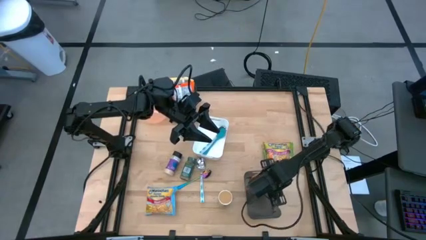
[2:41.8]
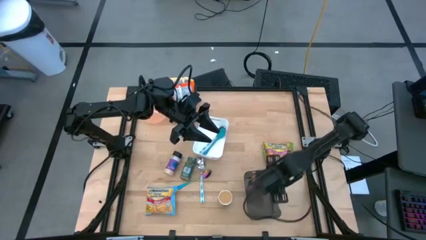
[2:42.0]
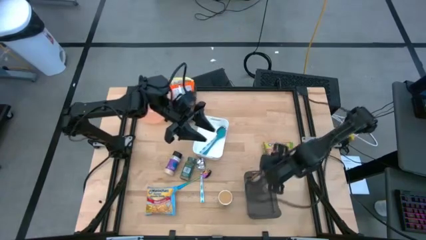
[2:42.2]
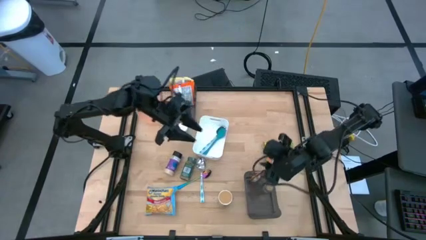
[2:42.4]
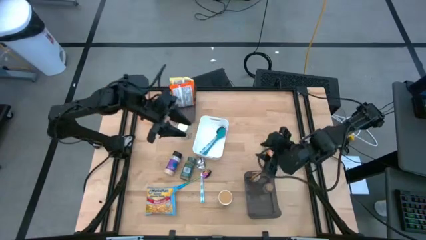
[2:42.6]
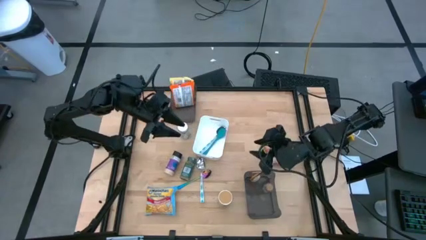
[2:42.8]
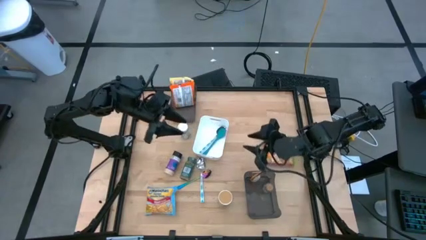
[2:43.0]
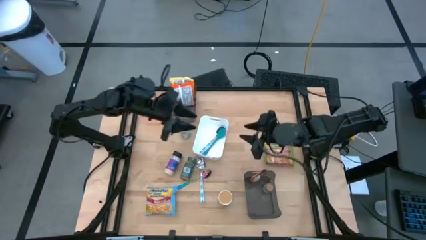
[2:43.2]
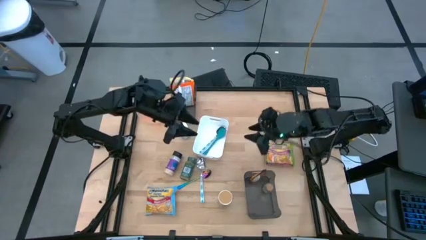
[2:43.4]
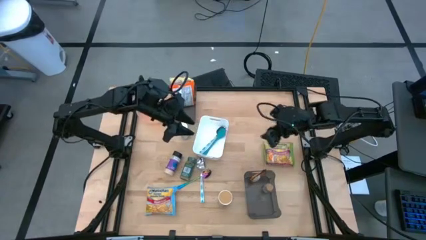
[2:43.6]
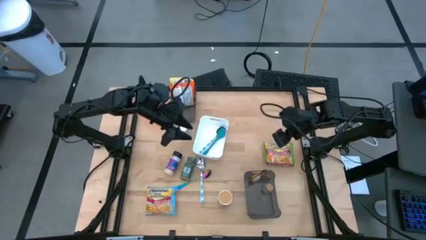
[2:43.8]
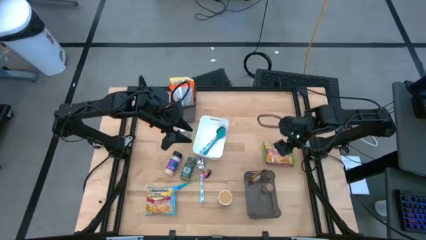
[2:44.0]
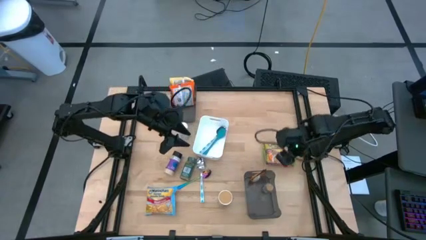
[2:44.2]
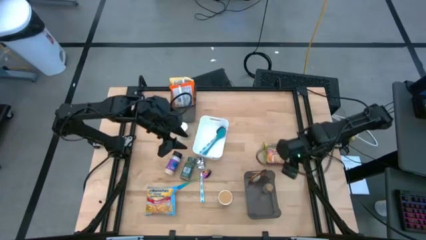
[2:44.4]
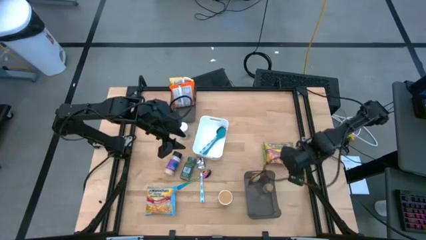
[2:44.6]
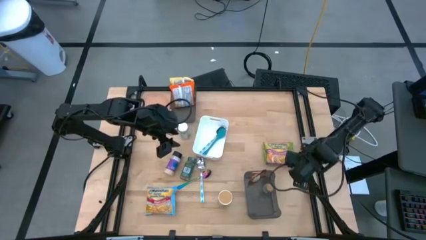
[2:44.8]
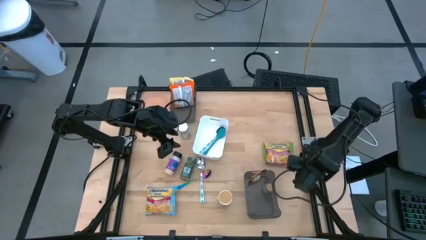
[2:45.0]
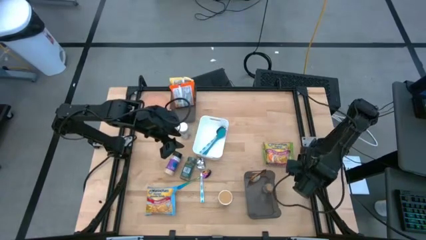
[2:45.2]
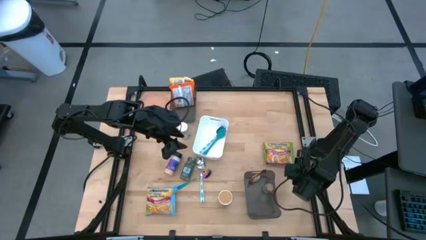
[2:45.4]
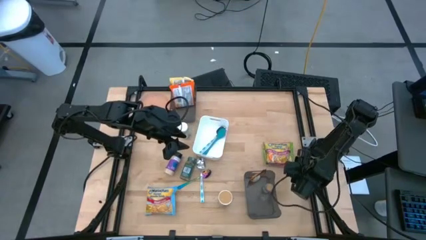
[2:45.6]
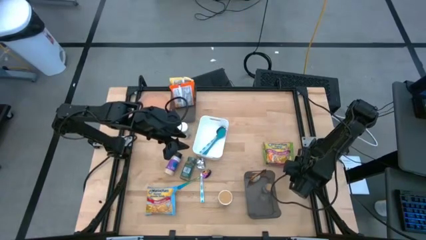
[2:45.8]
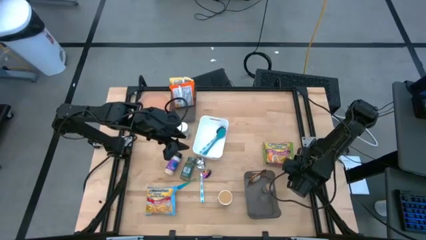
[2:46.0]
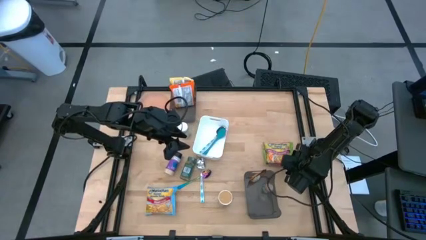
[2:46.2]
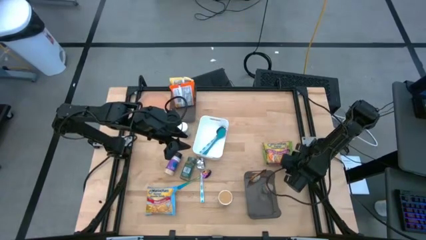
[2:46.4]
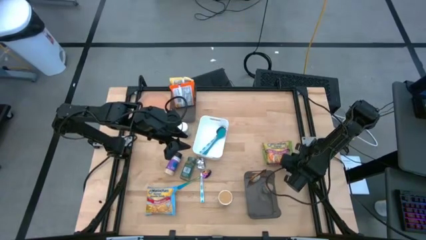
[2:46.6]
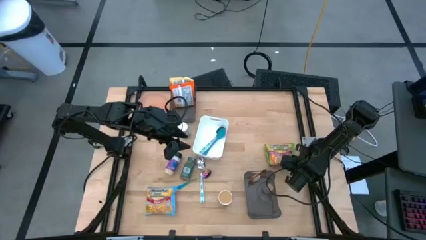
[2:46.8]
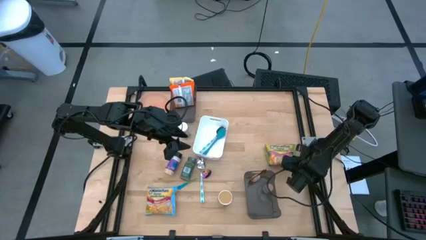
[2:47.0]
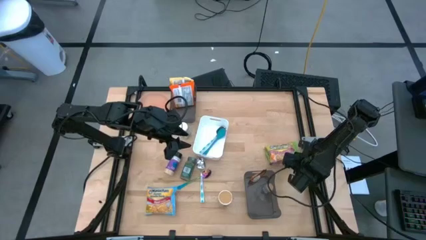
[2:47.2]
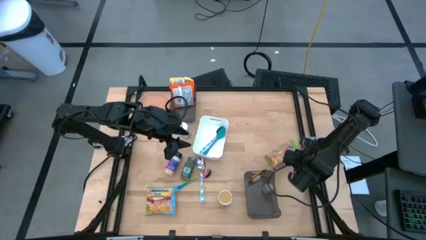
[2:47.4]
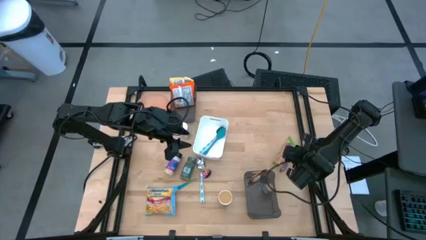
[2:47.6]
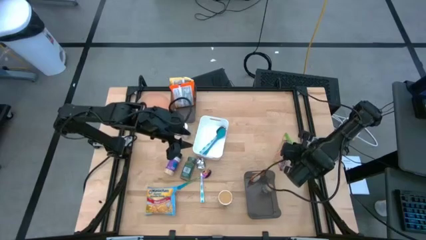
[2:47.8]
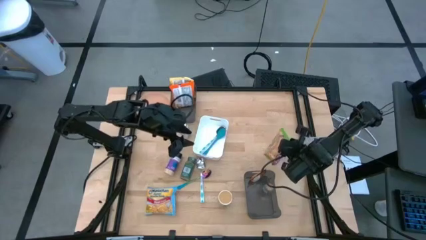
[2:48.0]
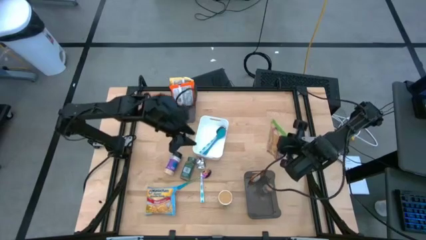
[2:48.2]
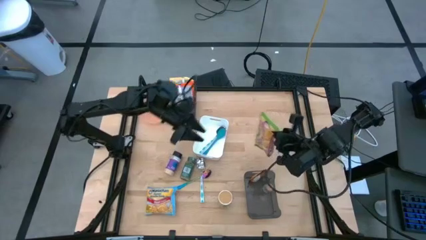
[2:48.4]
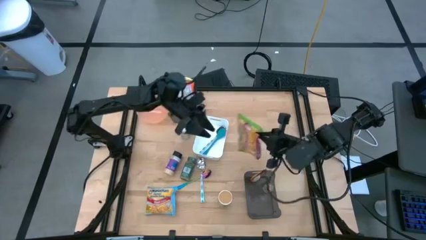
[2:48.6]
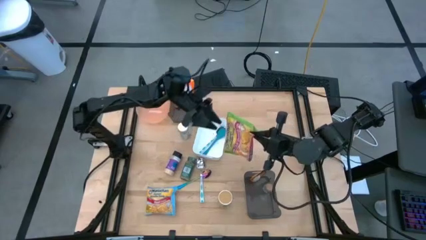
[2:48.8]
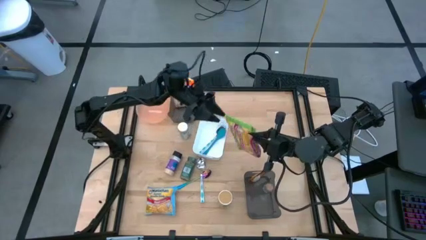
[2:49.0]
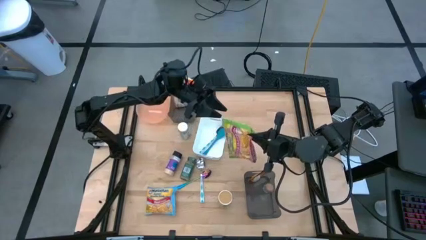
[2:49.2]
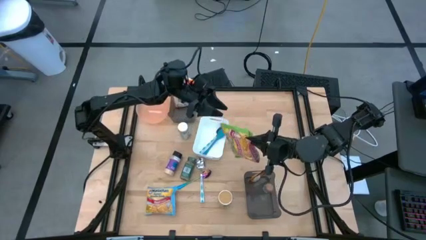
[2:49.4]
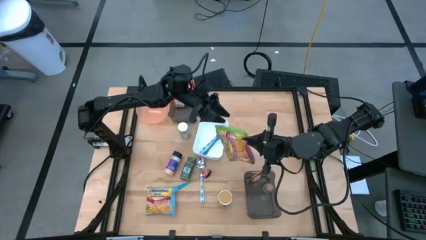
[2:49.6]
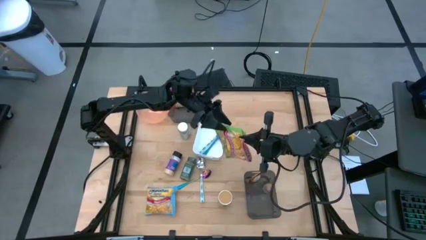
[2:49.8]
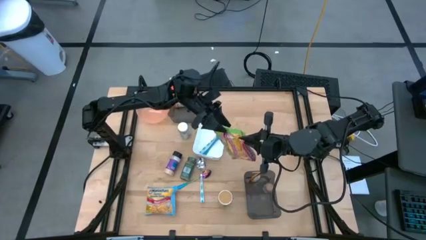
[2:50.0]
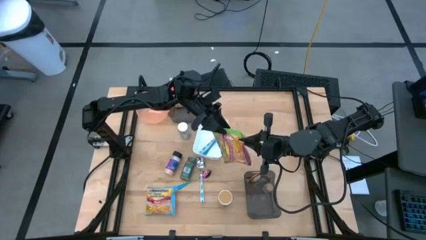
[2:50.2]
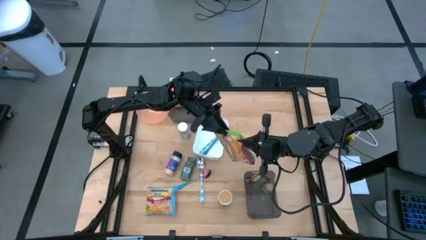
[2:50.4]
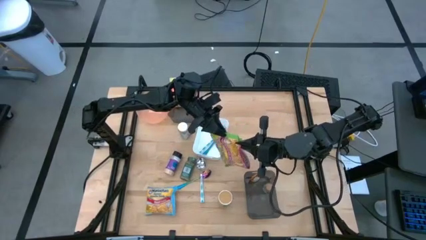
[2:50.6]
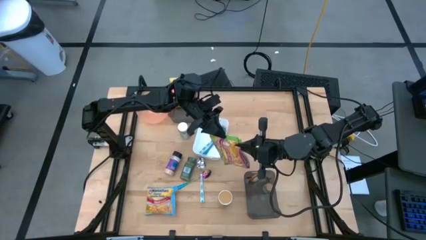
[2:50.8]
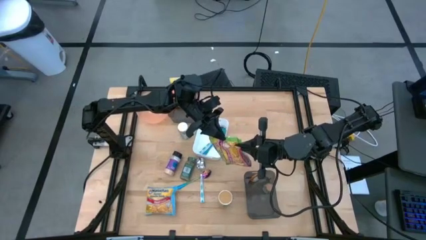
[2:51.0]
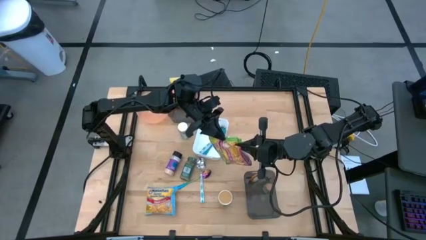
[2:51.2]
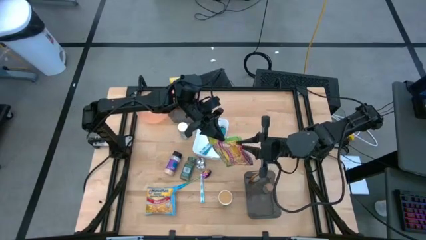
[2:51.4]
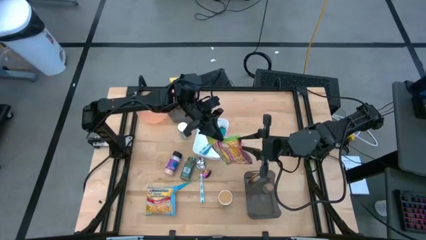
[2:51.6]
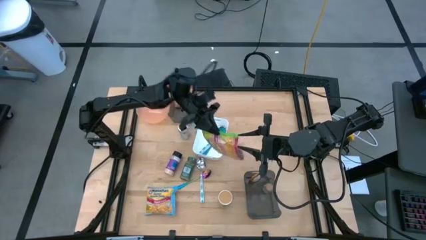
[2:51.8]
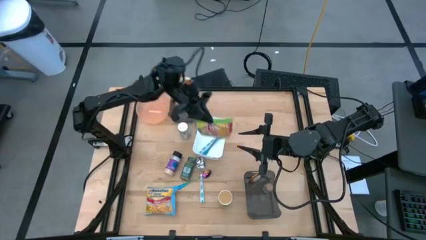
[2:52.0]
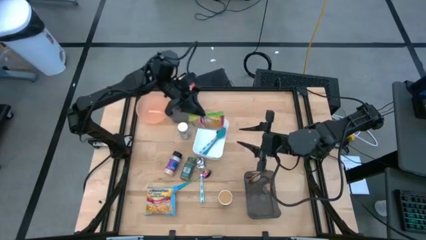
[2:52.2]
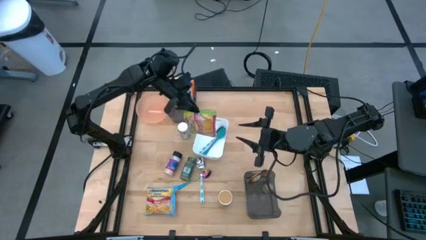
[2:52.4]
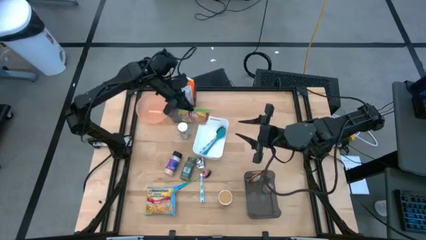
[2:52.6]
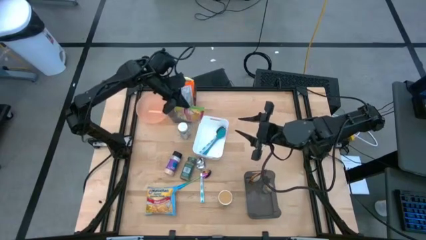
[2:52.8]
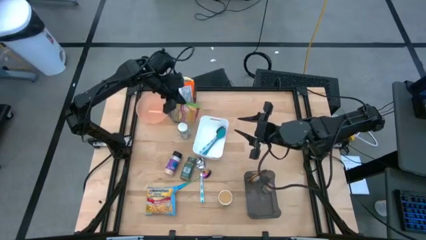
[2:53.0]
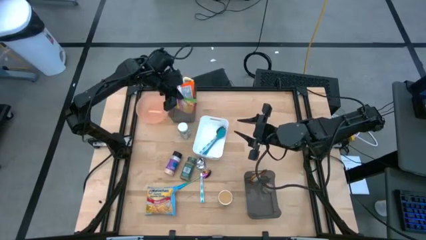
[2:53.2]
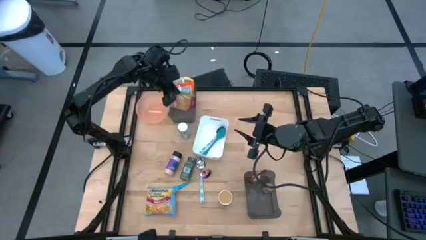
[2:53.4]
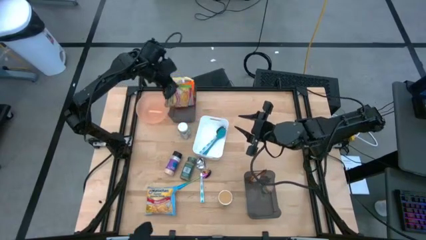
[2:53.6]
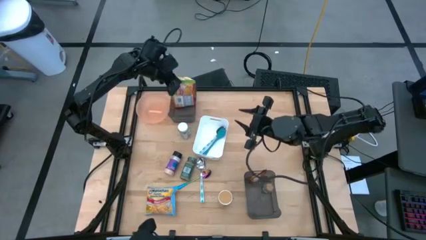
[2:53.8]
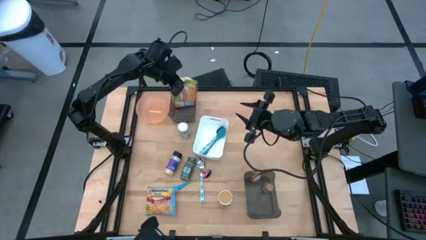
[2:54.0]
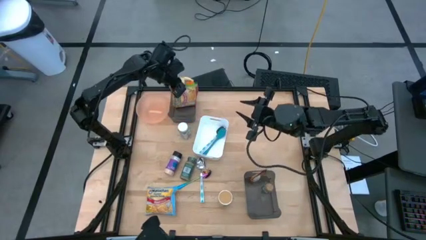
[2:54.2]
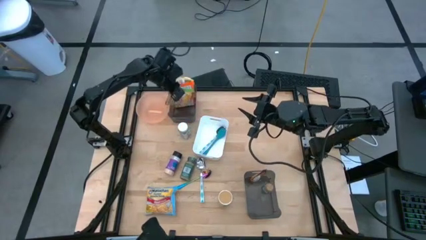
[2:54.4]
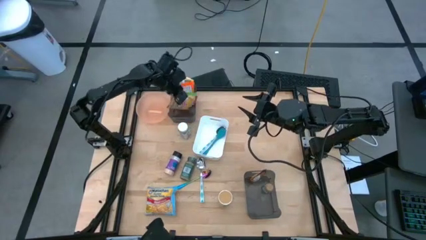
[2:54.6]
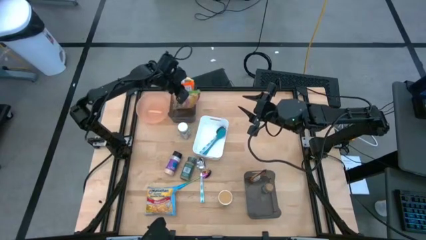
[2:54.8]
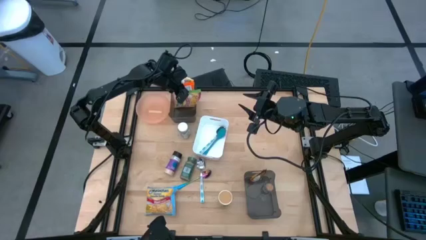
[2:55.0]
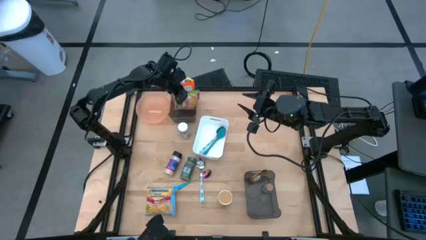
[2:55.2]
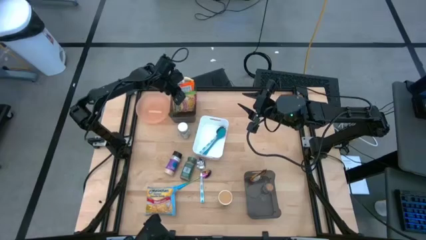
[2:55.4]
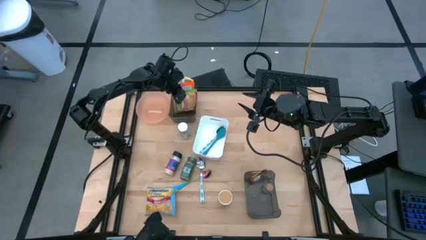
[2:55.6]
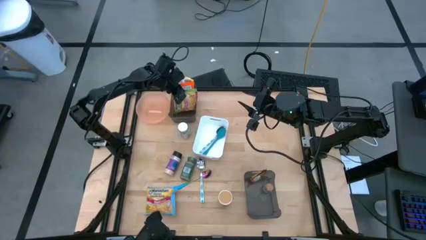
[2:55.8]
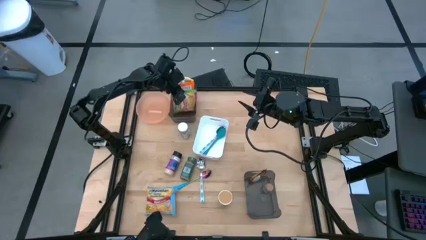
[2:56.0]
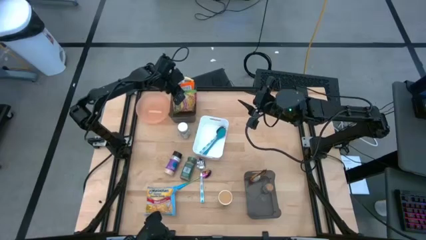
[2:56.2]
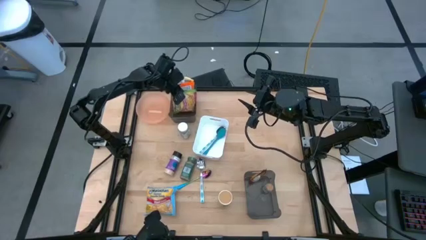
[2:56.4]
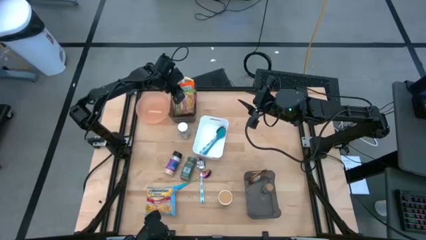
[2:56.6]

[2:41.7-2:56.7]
Task: Pick & Place Food Item
Put the green noodle pack into the top black bin

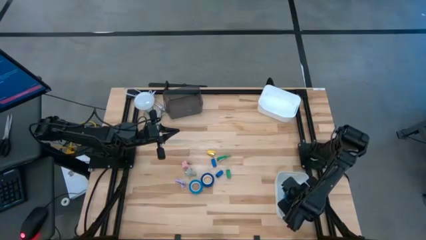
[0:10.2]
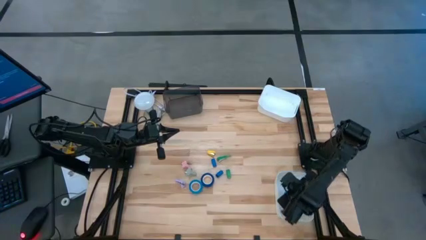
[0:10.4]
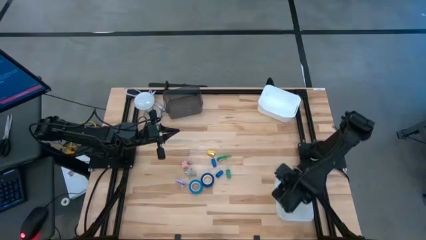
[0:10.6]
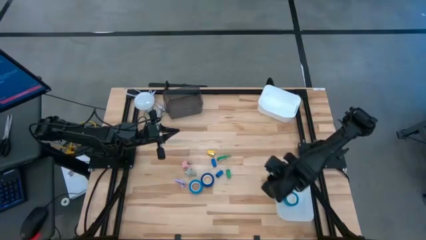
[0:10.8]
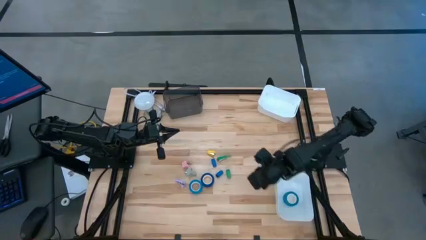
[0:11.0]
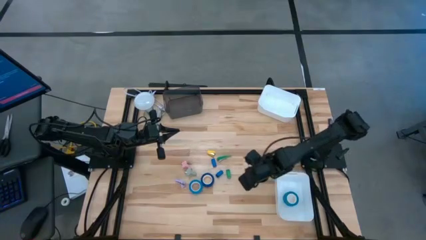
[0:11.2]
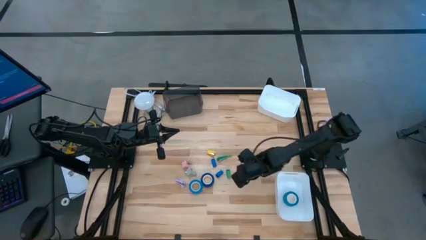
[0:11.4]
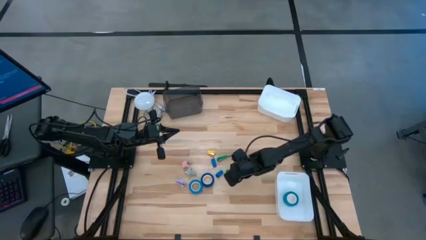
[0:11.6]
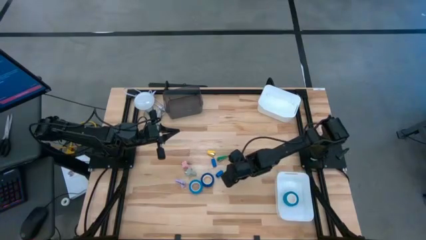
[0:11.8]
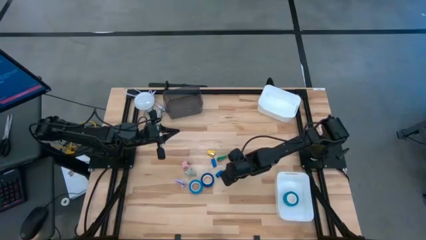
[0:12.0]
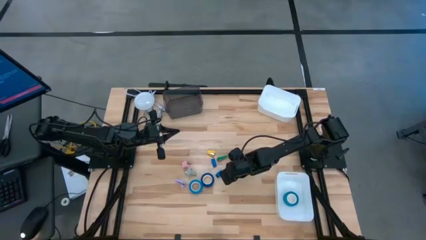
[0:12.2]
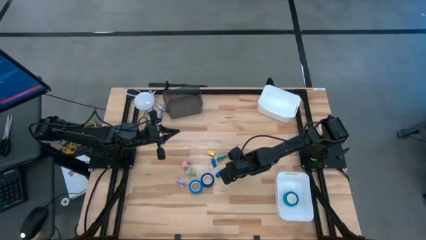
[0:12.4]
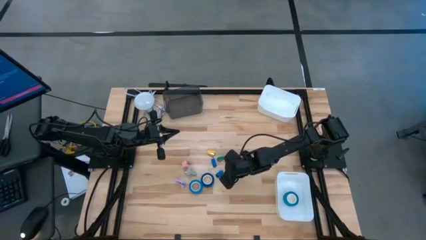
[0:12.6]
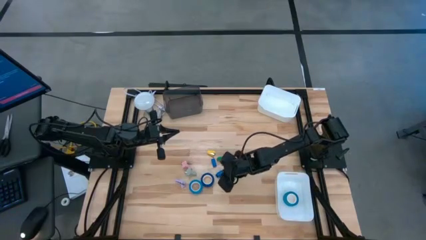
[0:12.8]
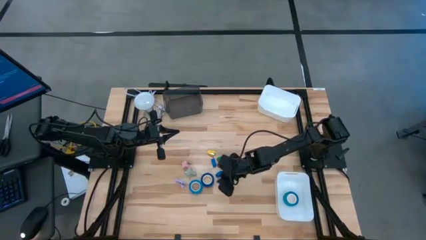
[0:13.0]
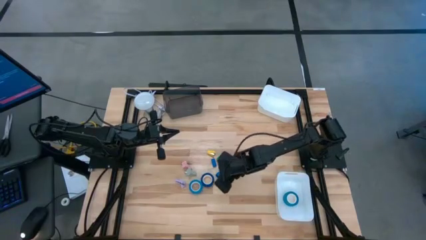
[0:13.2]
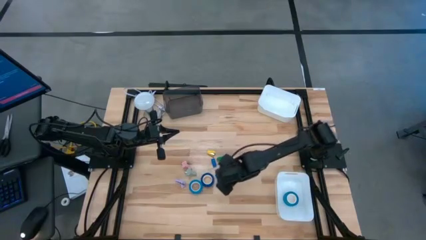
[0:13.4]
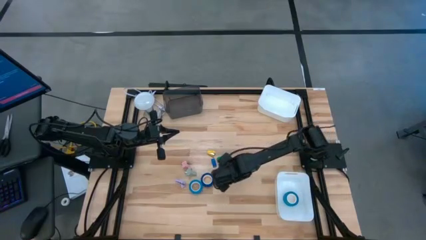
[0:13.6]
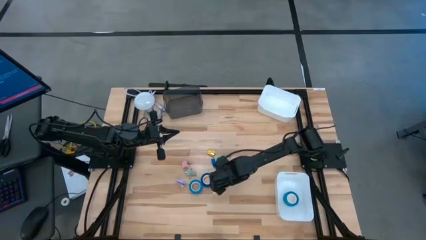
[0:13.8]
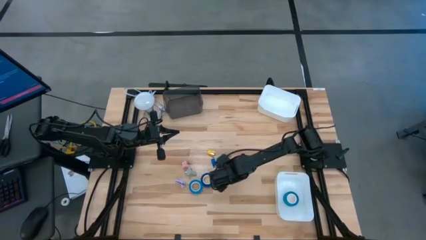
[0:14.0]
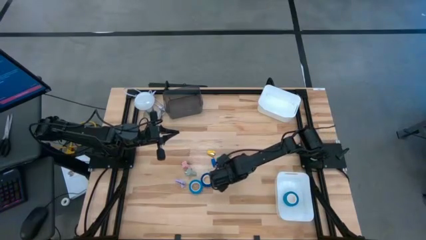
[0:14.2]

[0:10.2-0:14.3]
Task: Pick and place Stapler, Stapler remover, tape
Put the bottom green stapler into the top white bin
